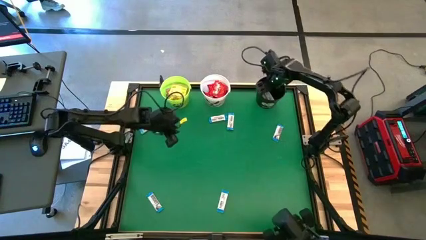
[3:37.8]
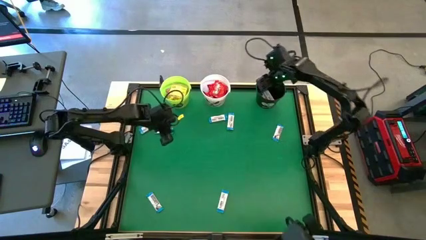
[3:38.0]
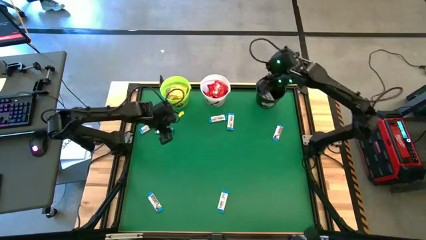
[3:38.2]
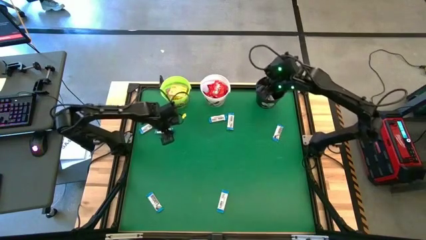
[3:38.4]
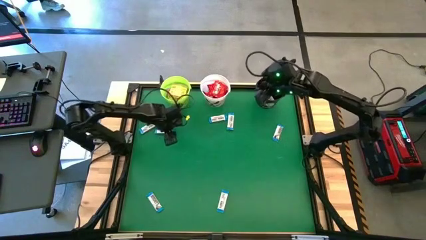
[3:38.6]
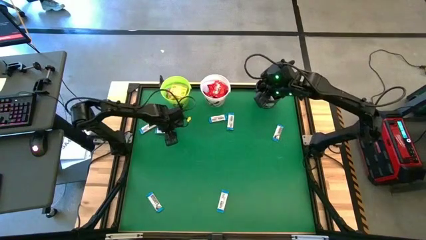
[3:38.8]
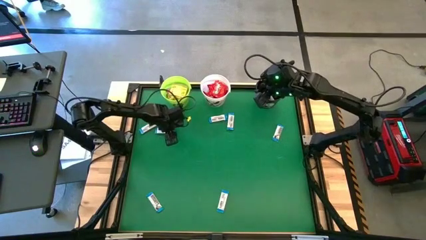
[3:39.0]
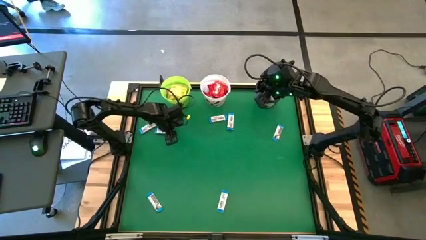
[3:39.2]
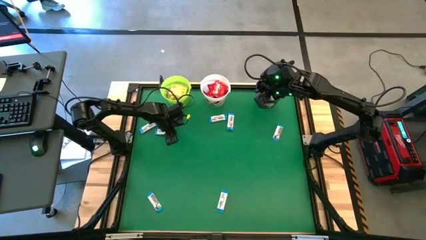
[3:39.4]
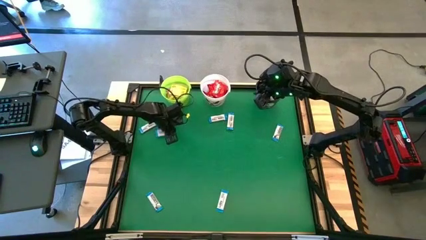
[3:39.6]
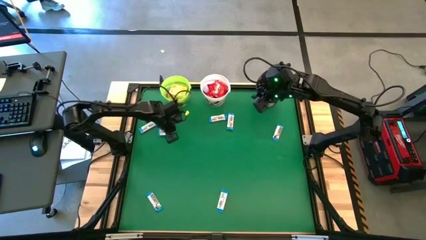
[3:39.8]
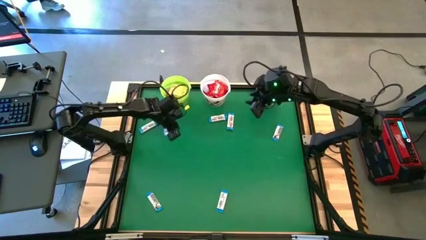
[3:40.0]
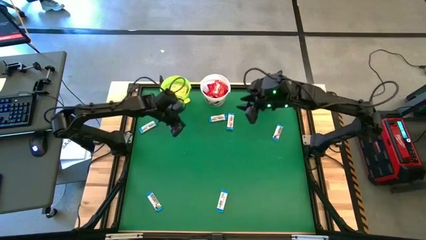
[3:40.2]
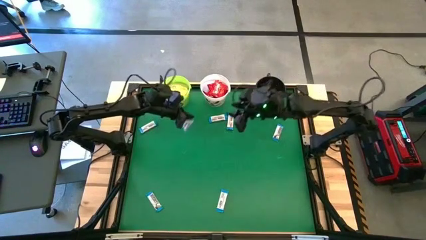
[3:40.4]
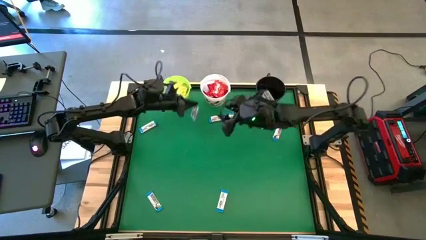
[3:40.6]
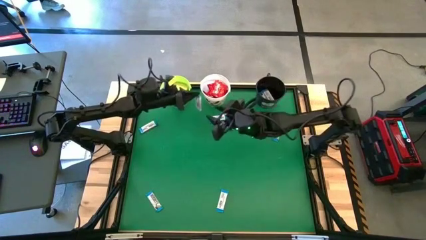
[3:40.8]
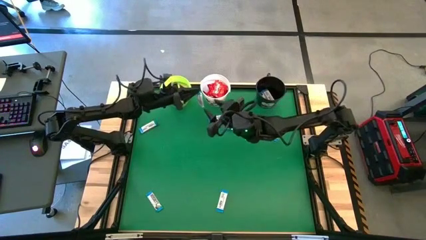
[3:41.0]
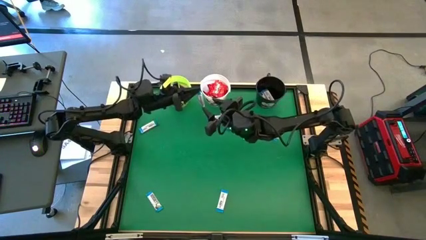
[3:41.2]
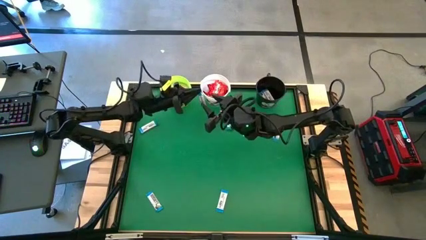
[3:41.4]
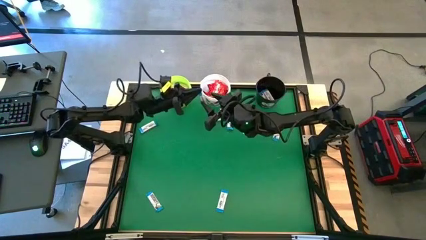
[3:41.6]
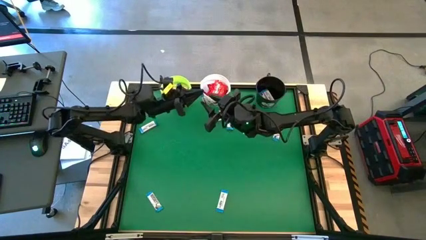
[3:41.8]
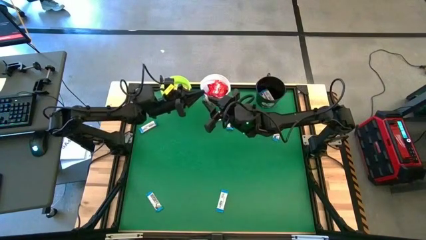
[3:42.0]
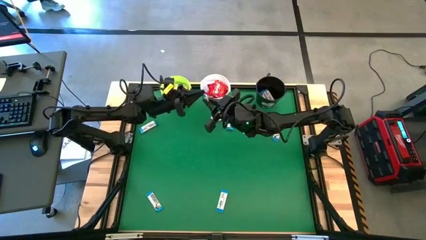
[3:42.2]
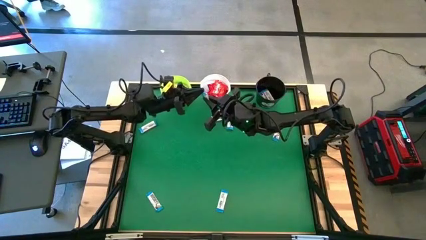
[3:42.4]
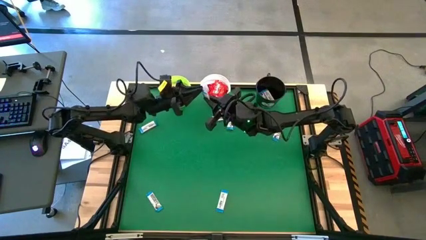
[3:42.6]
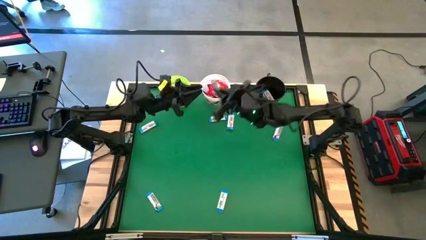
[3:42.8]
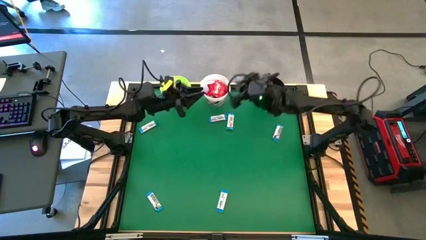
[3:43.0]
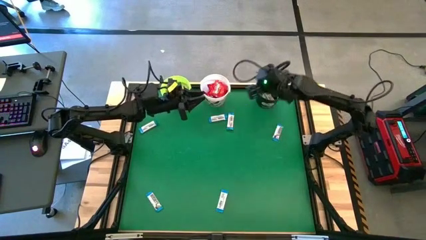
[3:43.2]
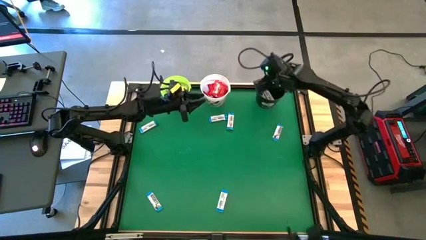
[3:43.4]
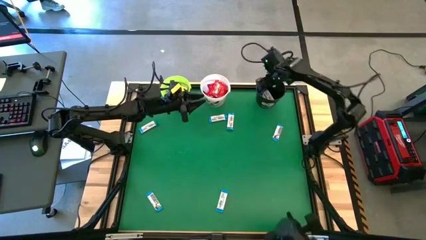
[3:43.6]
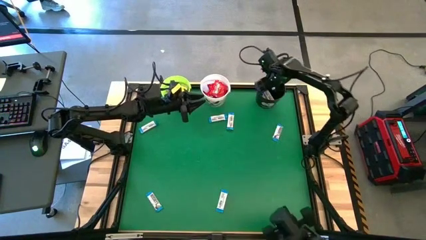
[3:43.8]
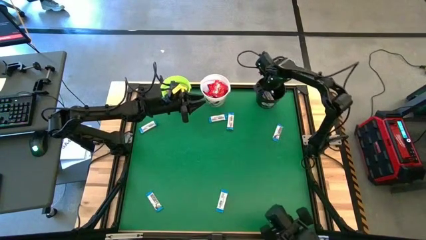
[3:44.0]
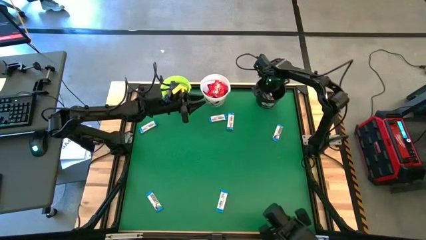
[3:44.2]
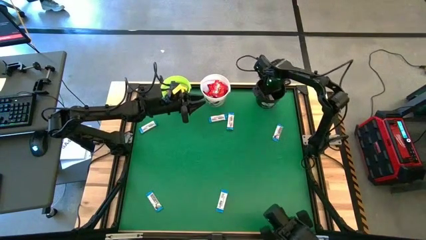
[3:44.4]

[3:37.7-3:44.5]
Task: Sort candy by brand, put in halloween buckets
Put the white chocolate bar into the black bucket

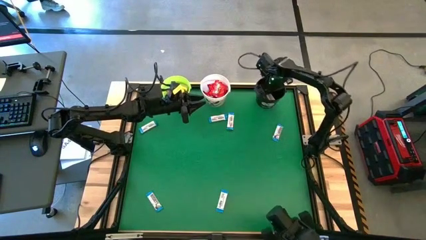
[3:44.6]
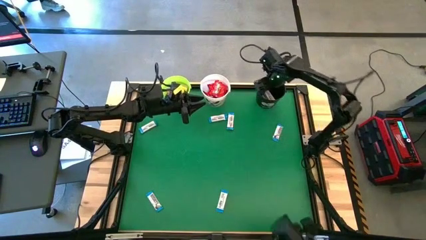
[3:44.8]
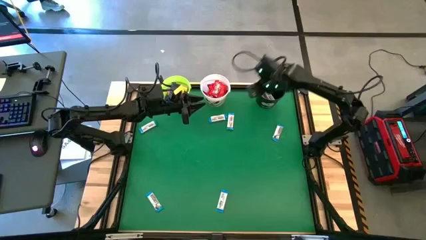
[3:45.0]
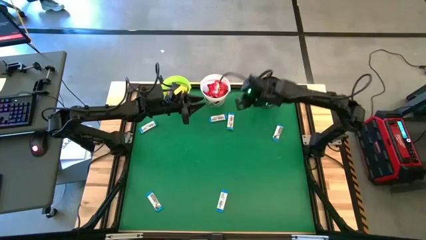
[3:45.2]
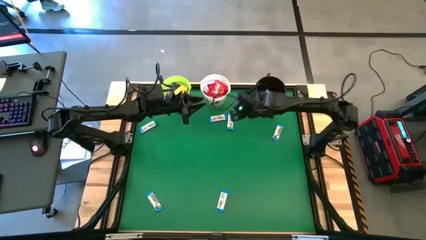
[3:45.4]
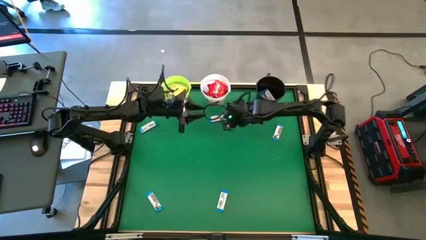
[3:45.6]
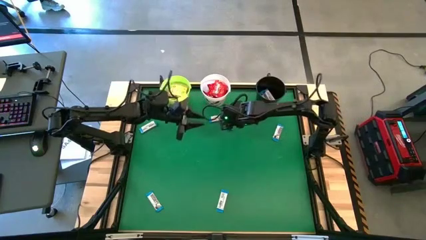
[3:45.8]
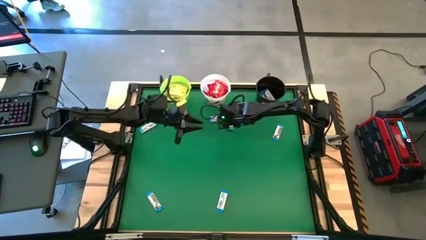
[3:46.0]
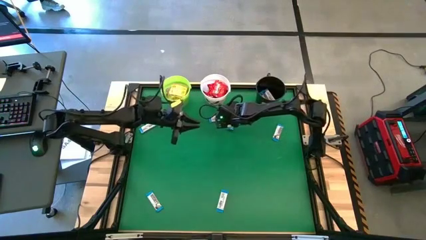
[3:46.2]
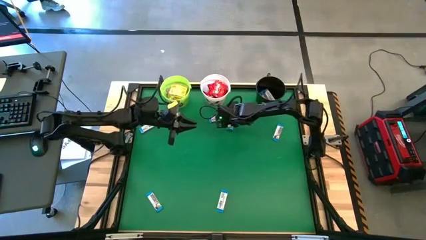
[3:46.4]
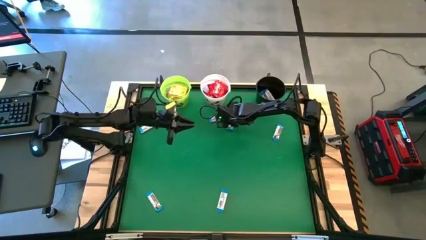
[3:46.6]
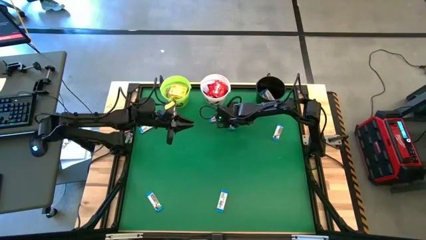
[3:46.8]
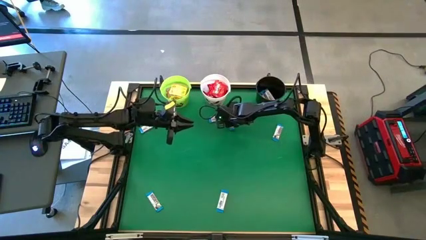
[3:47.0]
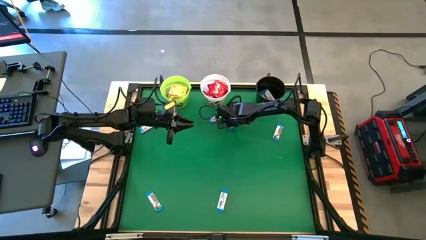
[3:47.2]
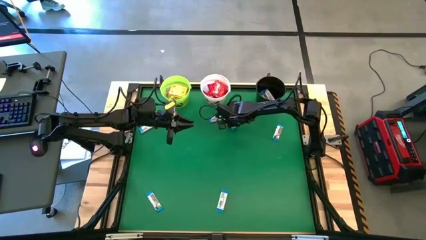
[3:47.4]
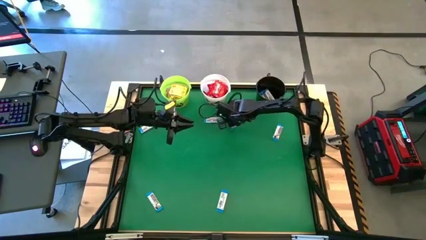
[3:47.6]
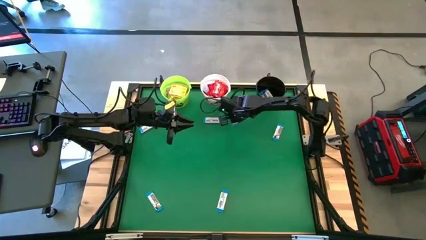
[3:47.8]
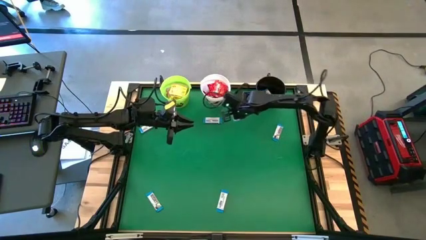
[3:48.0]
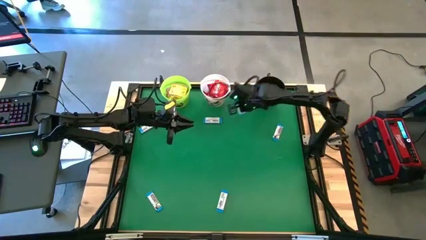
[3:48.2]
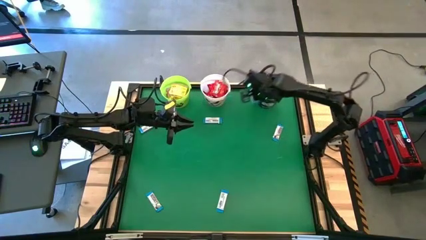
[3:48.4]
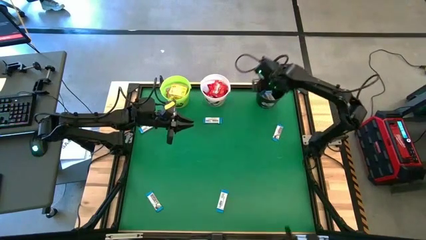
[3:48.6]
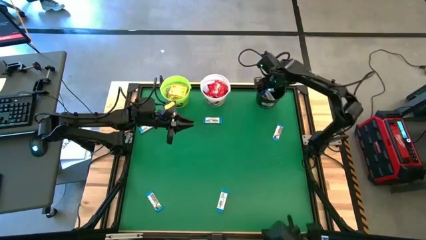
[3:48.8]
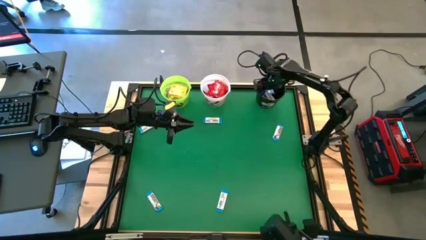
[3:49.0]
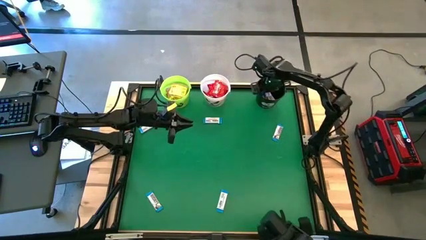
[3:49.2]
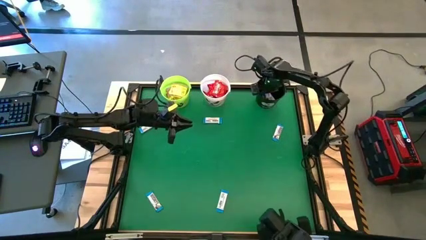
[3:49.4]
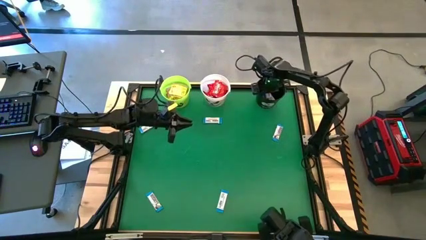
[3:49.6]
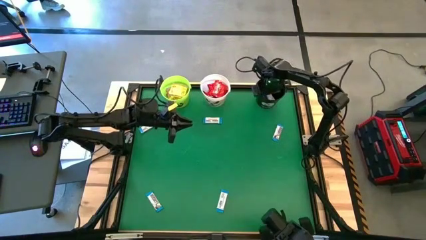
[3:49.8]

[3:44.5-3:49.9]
Put the white chocolate bar into the black bucket

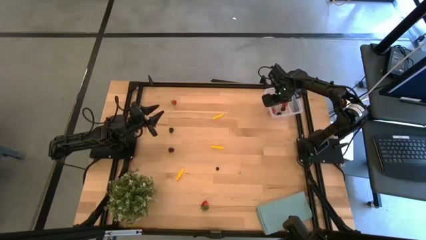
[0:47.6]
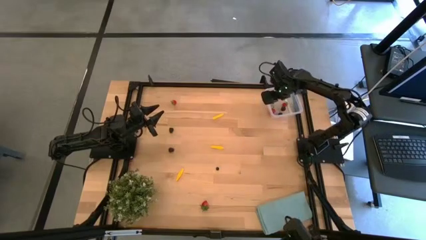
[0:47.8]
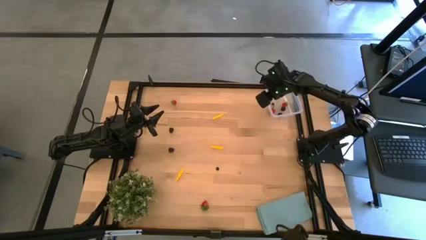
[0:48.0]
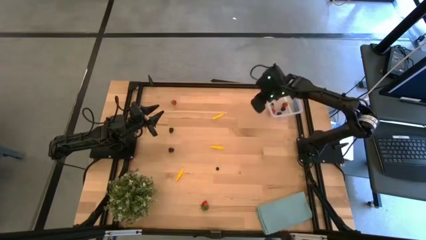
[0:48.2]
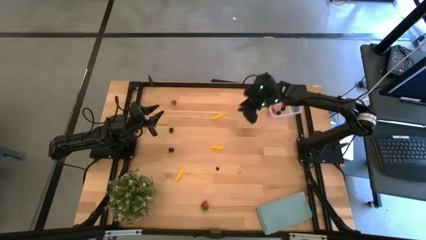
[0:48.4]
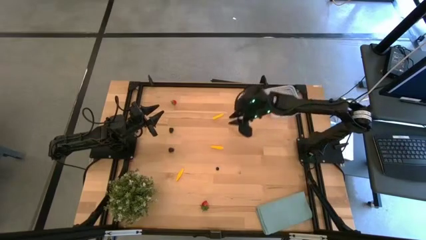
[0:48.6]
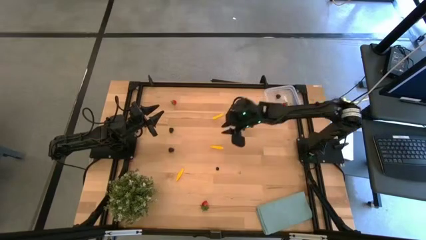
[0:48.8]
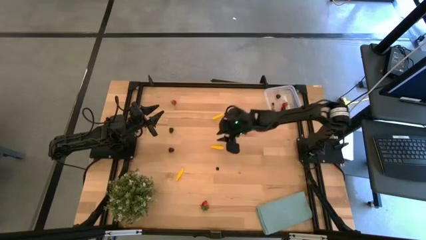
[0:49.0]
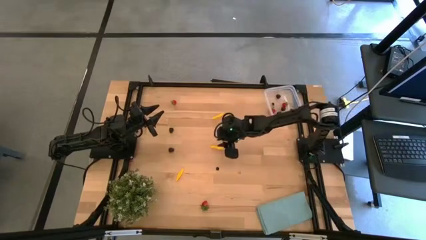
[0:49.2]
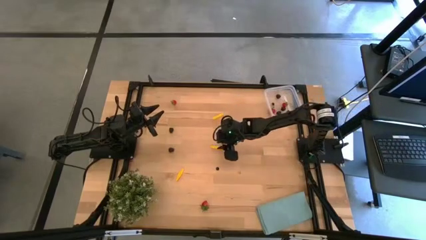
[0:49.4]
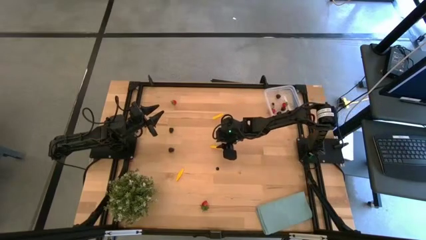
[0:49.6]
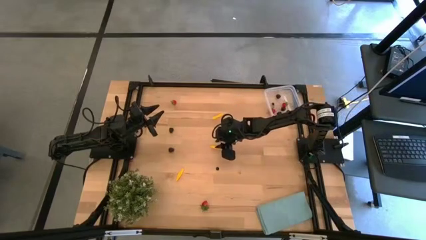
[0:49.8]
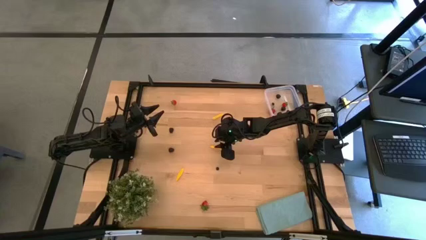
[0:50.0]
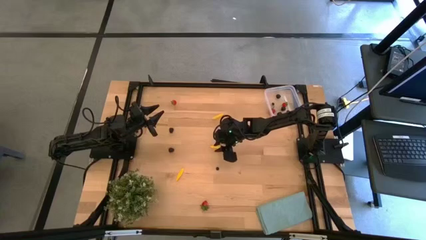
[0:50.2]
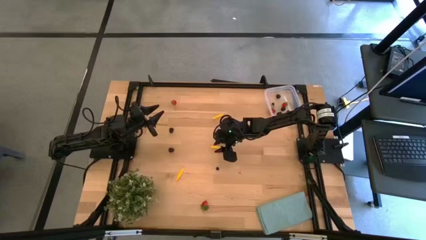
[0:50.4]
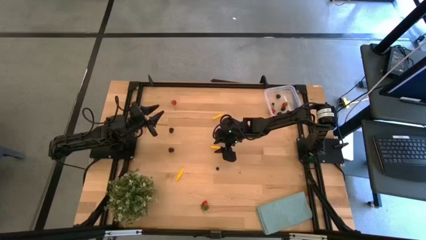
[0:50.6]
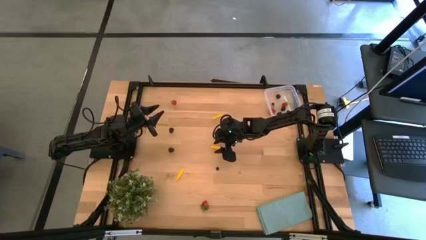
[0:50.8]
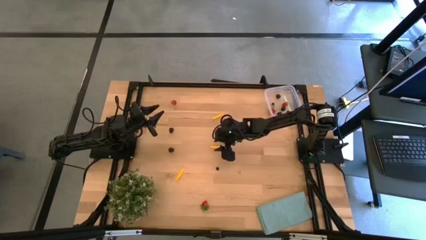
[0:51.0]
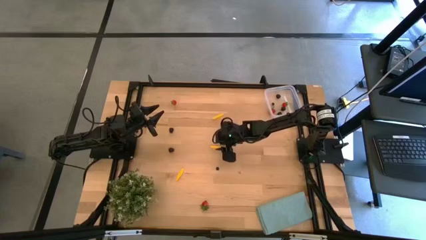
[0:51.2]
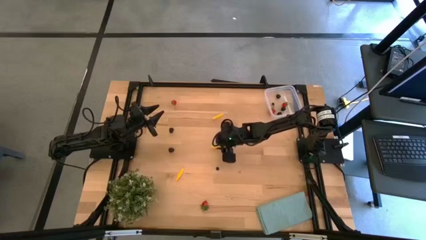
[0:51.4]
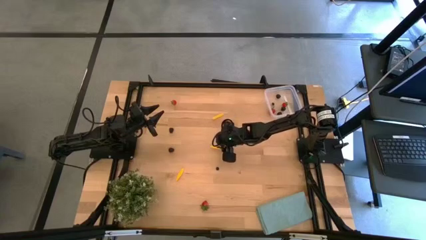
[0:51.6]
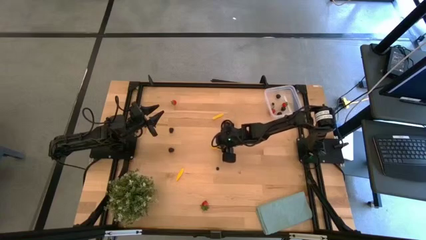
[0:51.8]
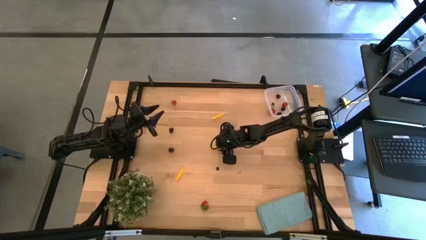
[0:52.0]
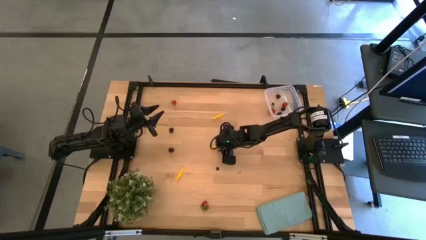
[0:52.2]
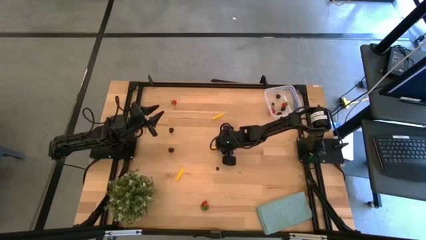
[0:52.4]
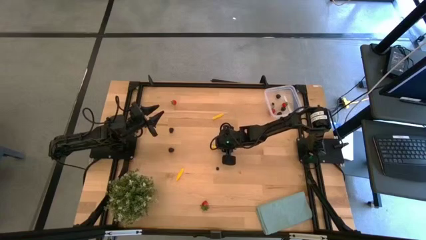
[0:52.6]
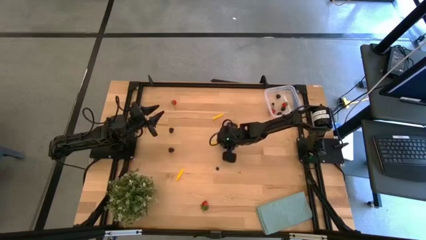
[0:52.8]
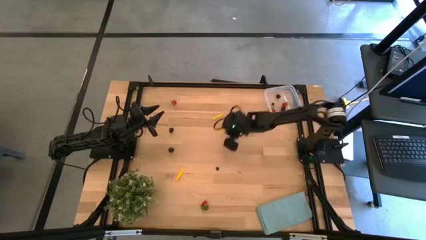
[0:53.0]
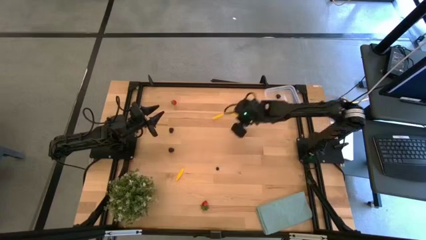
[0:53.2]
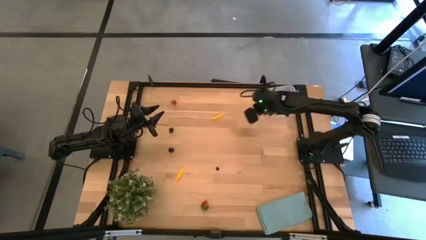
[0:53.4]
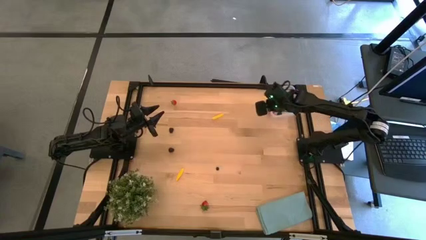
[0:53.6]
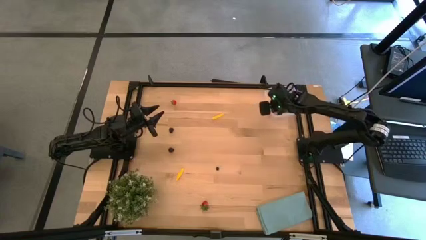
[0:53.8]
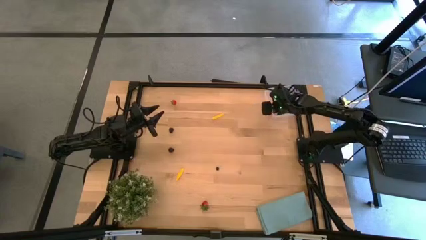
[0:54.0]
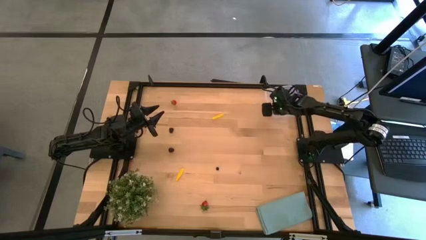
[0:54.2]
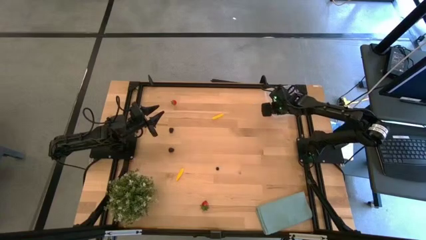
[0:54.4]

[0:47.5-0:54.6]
Task: Pick and placing Produce into tupperware
Put the yellow corn into the transparent bin
